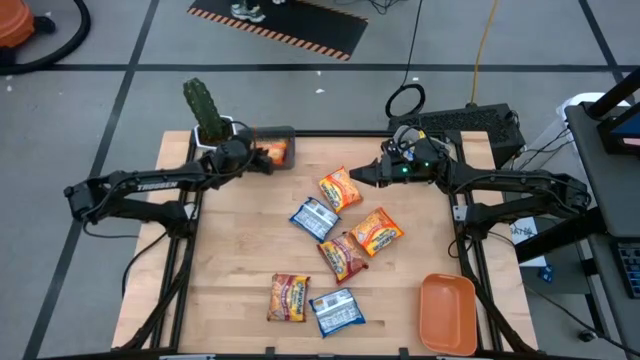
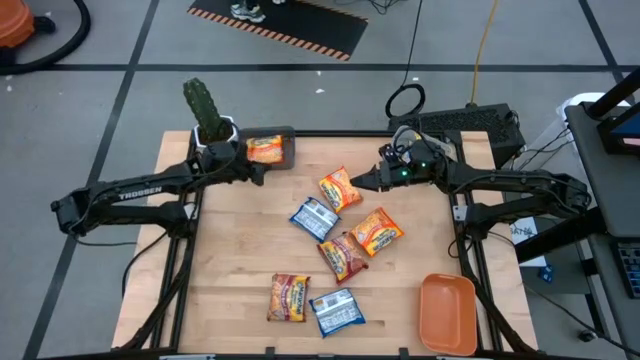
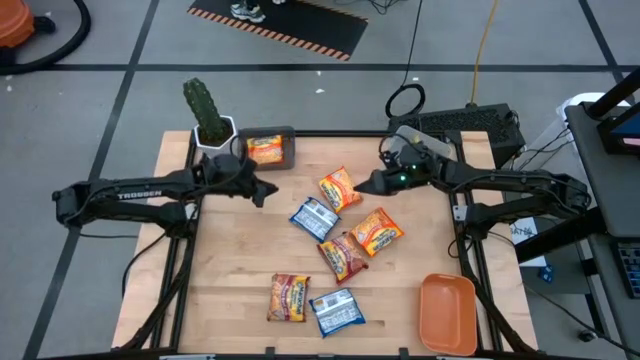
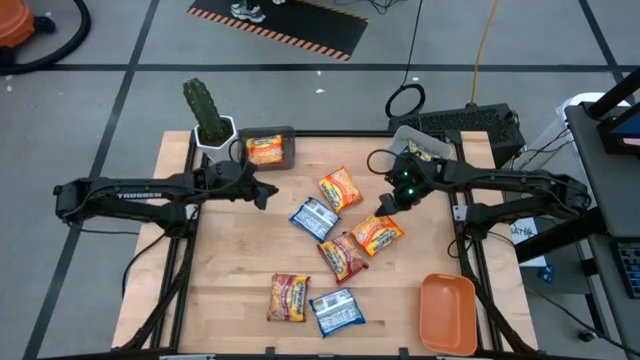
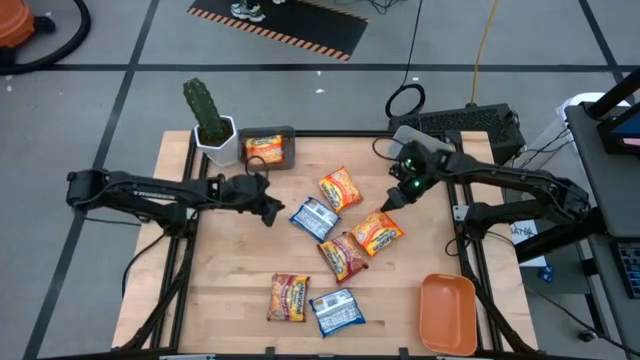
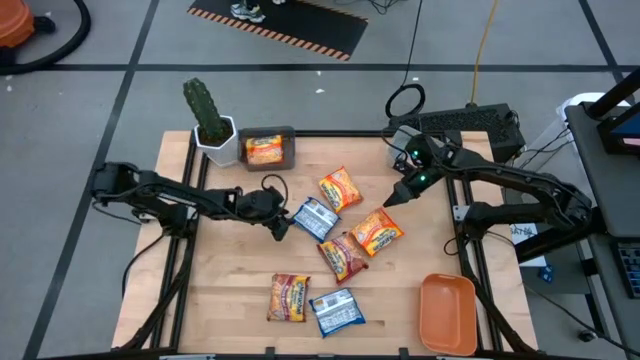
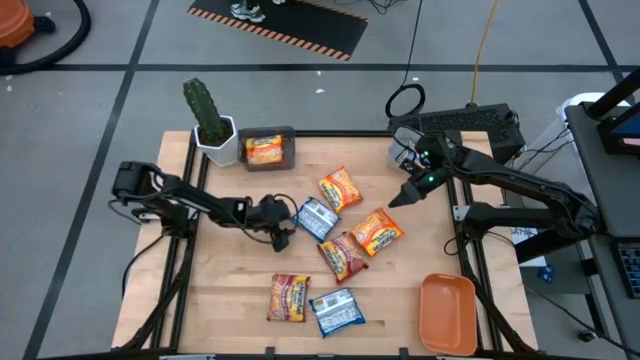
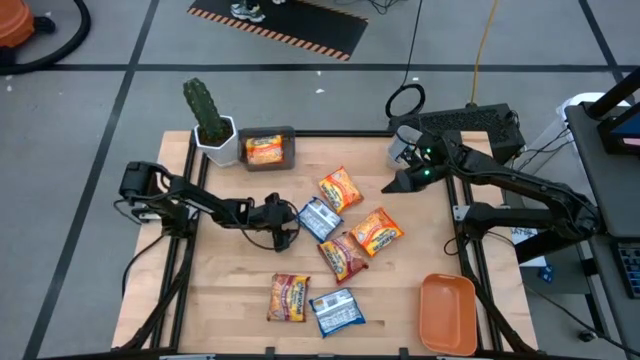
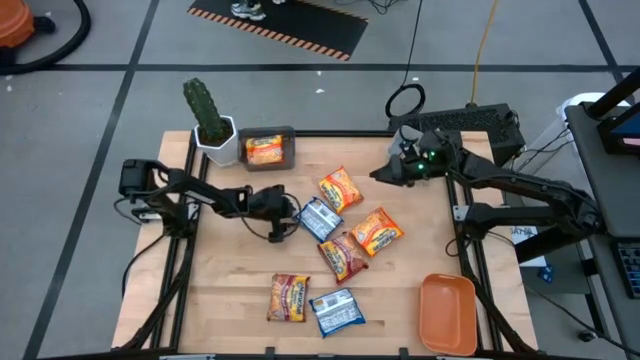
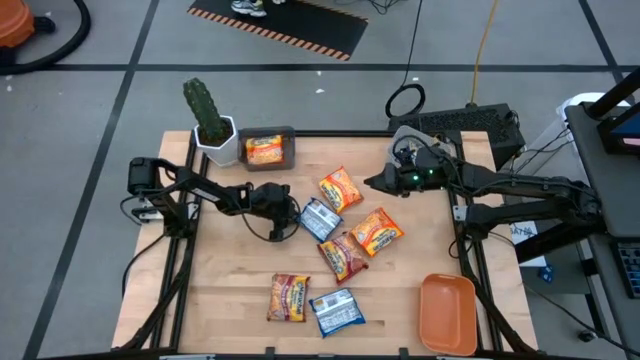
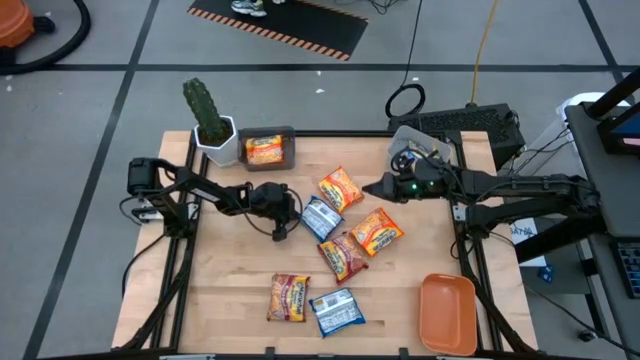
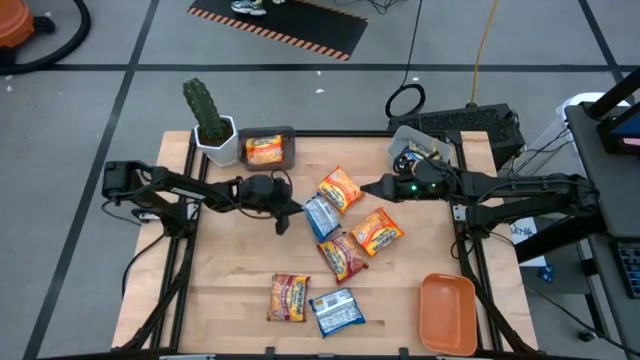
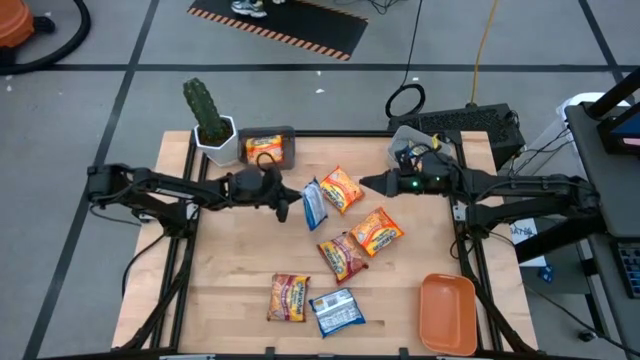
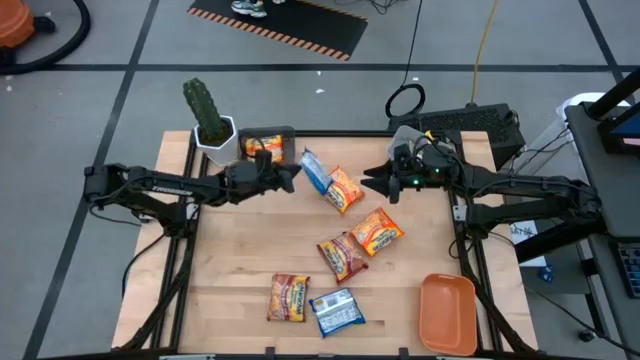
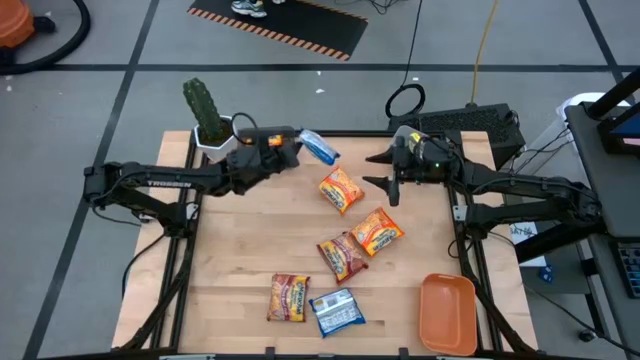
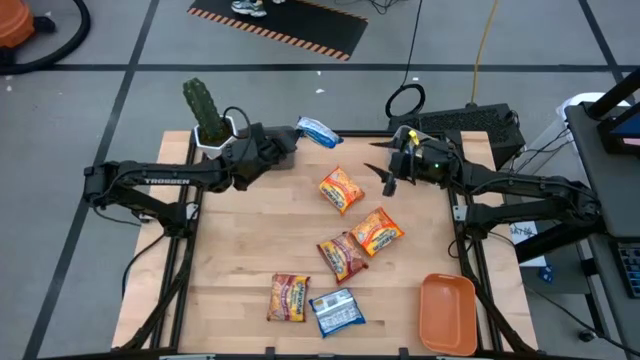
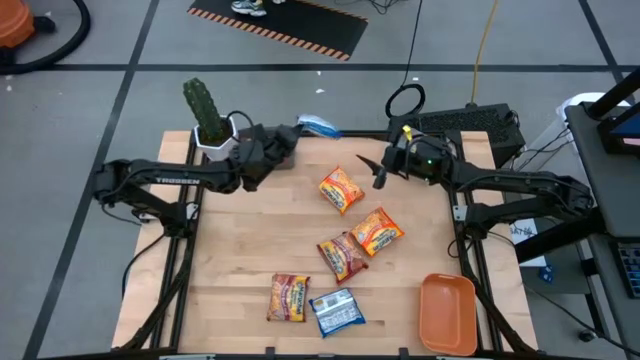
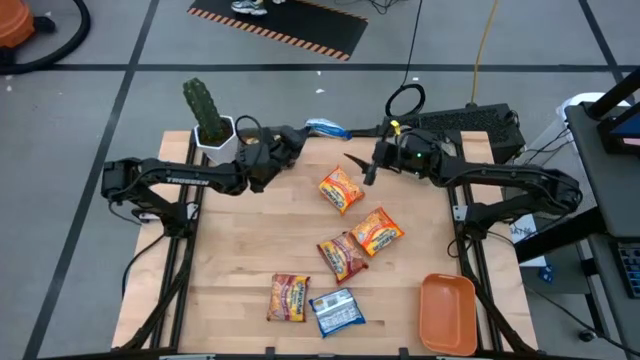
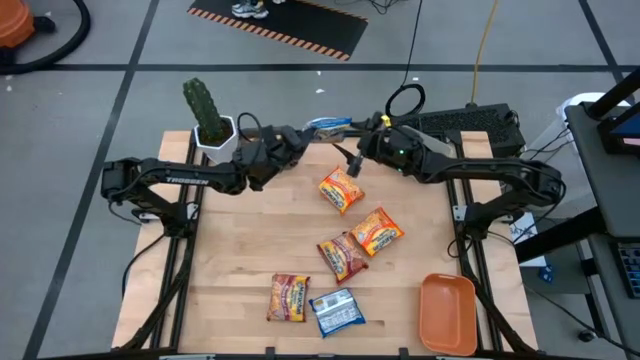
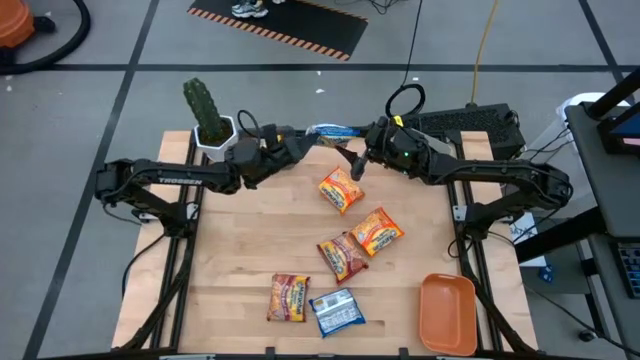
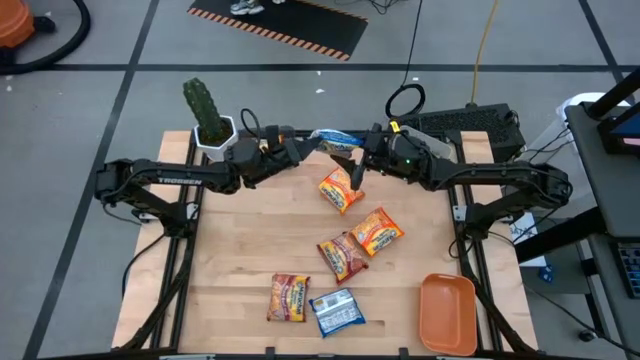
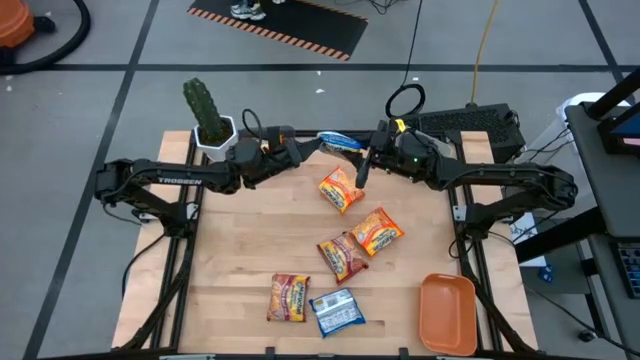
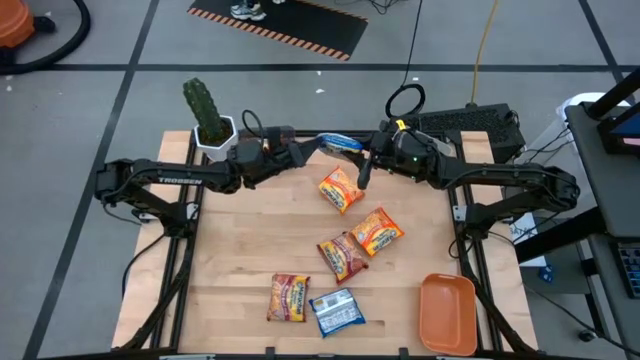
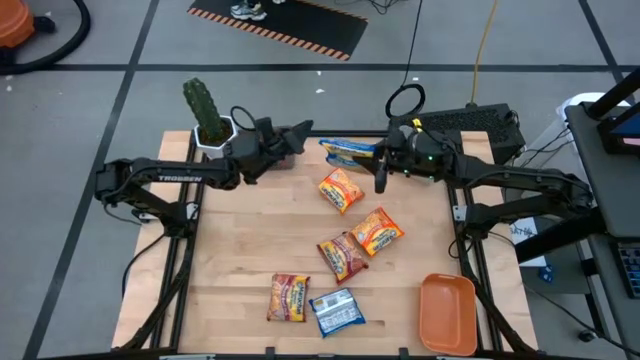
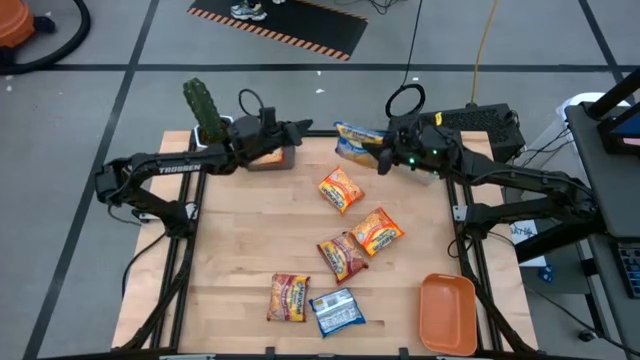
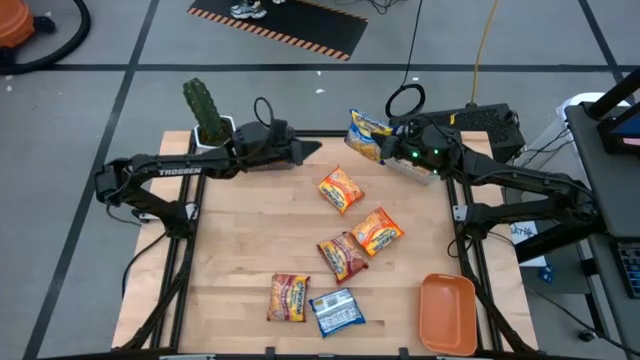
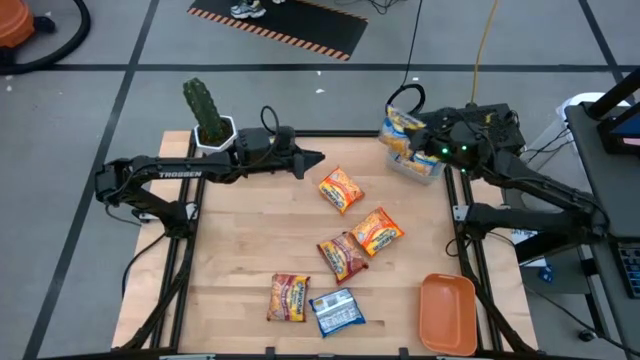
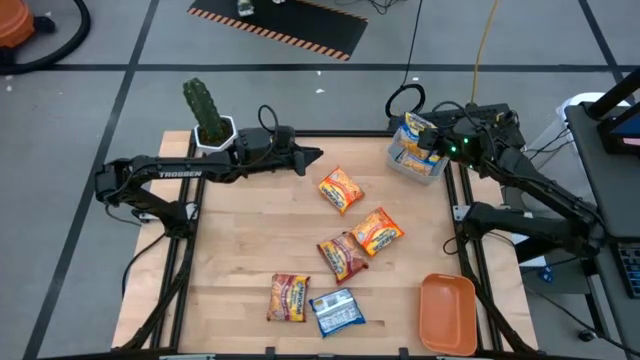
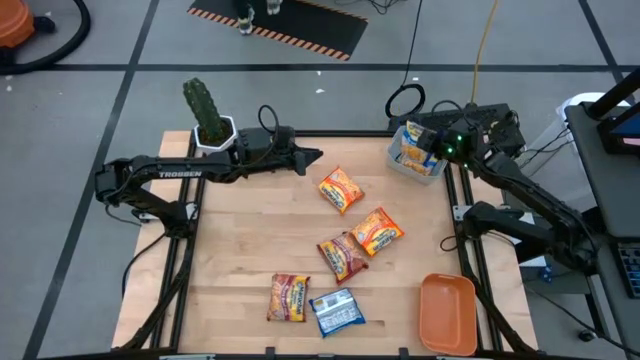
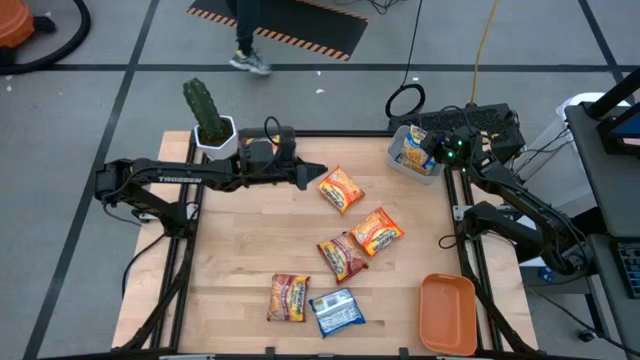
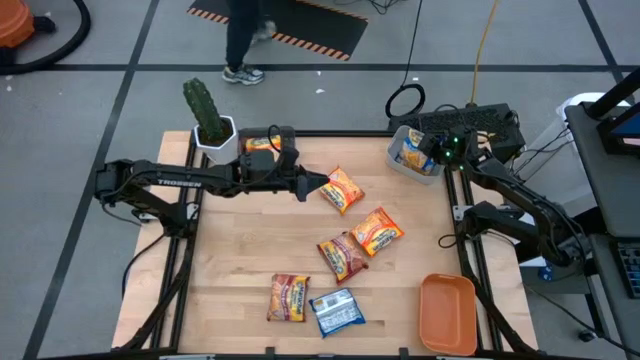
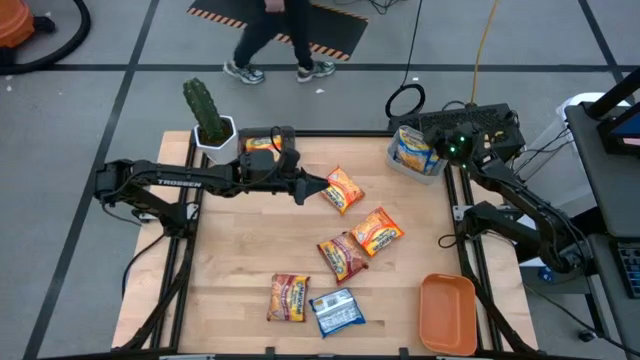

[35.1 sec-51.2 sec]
Task: Sort Maruchan noodles
Put the top blue noodle pack into the gray bin

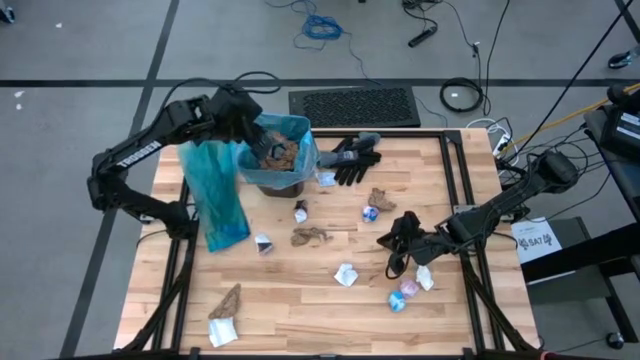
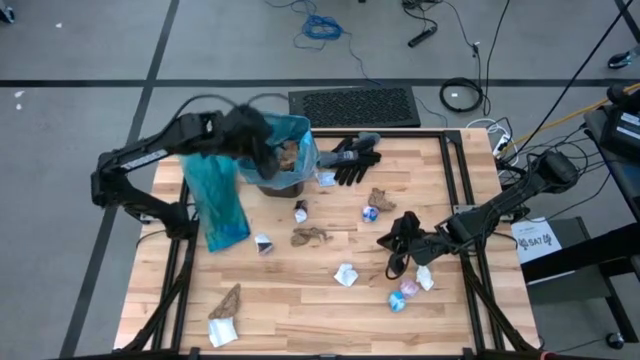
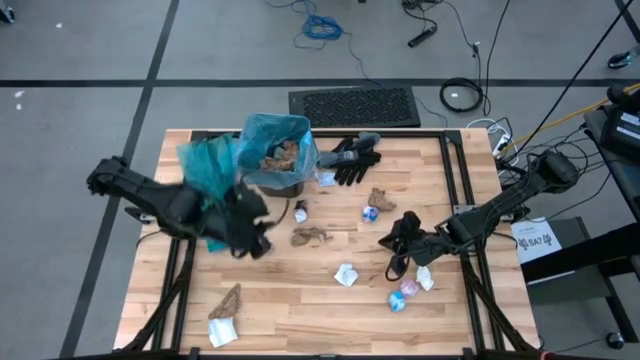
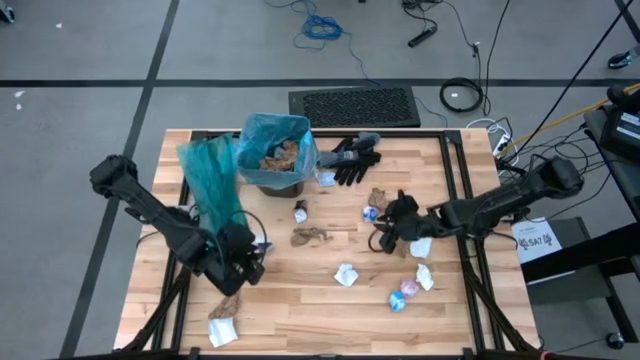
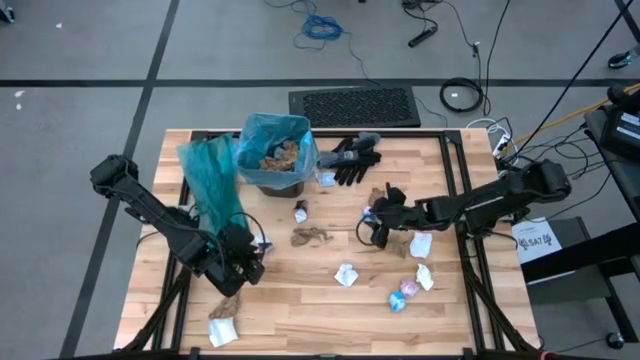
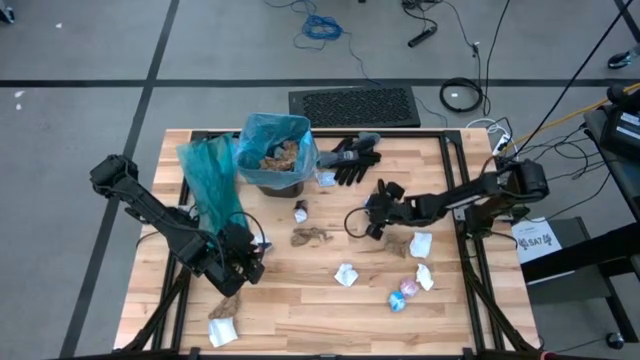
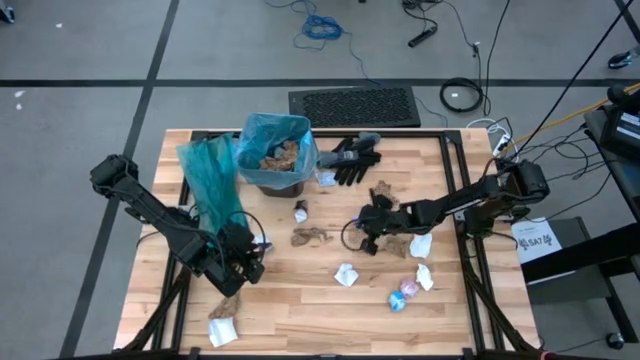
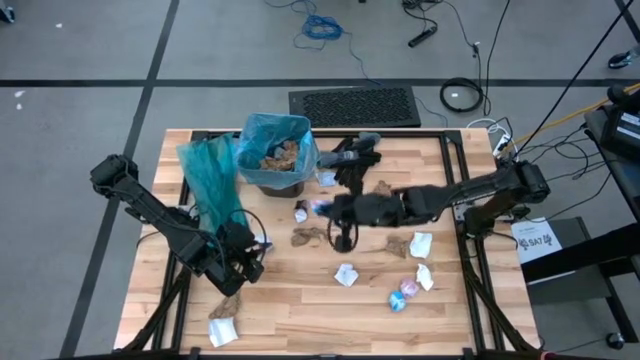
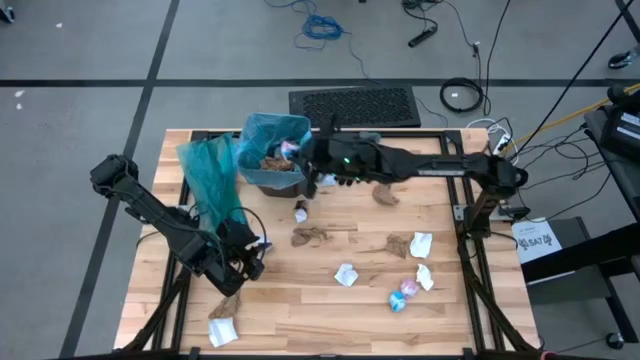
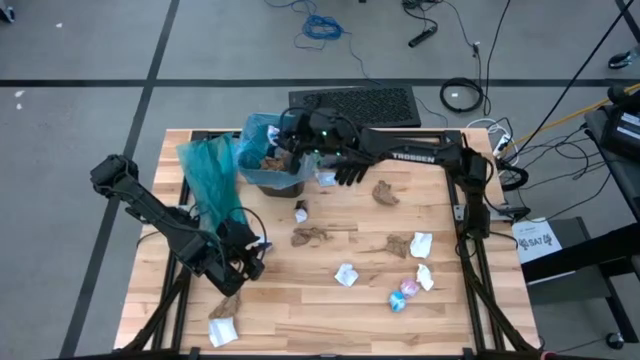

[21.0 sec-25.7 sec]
Task: place trash/remove bag and relplace
Put the pink plastic into the trash bin

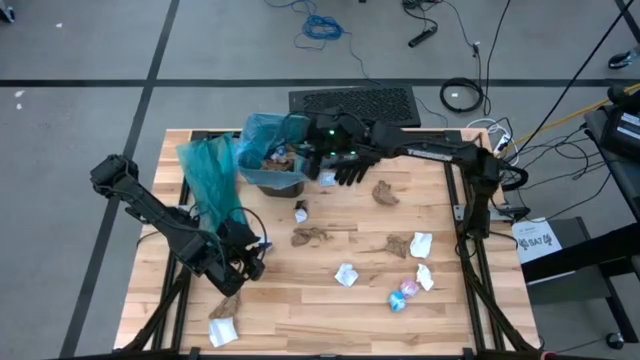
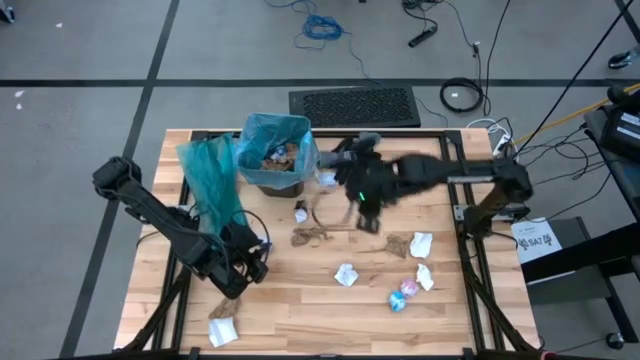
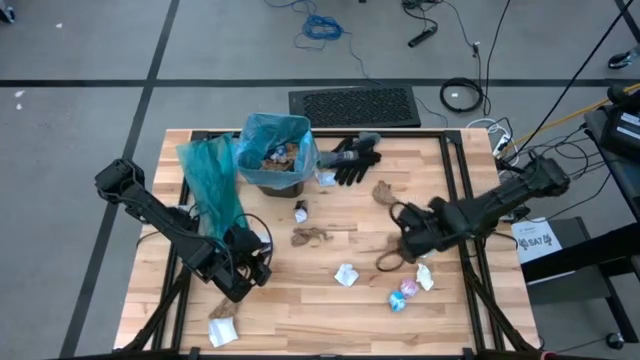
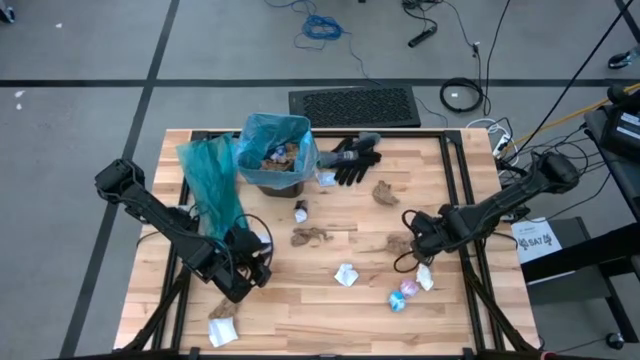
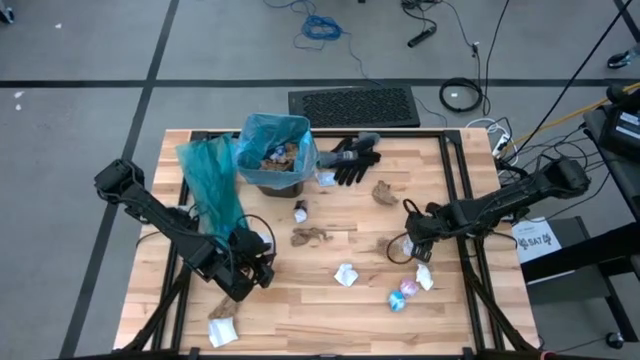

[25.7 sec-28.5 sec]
Put the white cardboard into the trash bin
